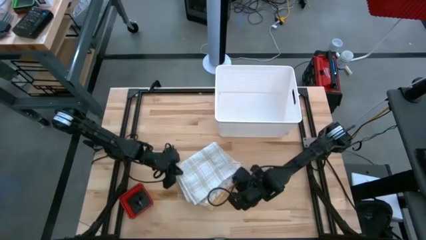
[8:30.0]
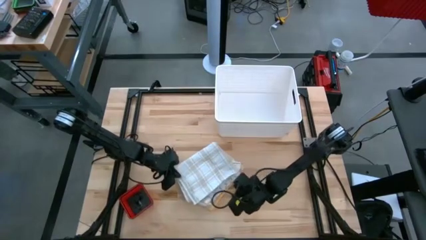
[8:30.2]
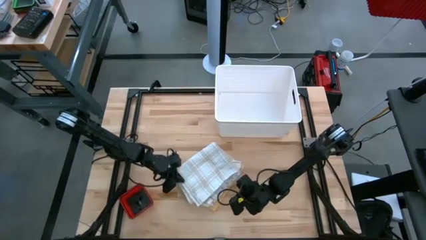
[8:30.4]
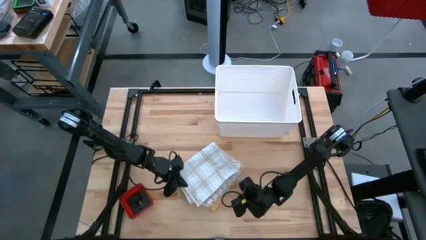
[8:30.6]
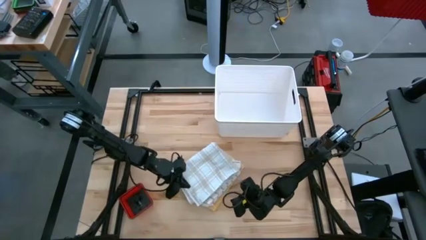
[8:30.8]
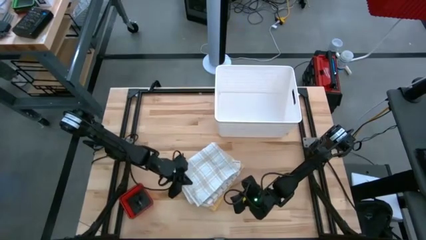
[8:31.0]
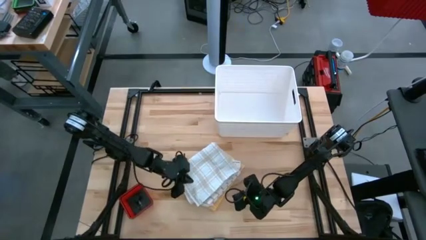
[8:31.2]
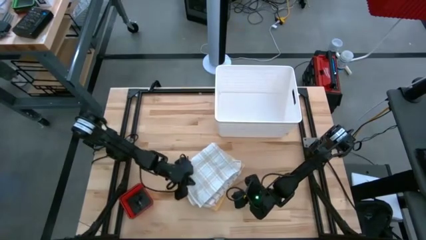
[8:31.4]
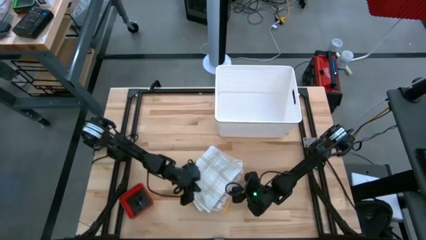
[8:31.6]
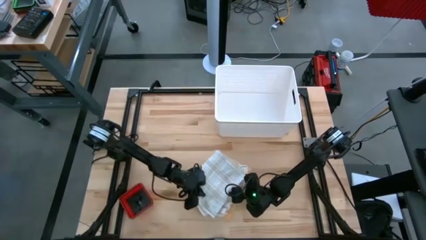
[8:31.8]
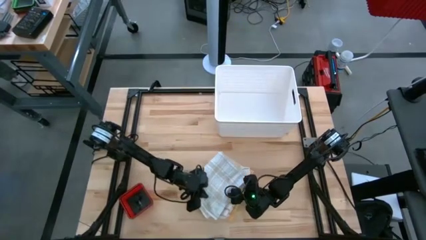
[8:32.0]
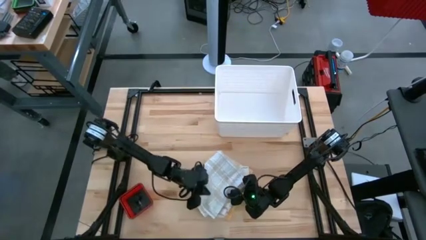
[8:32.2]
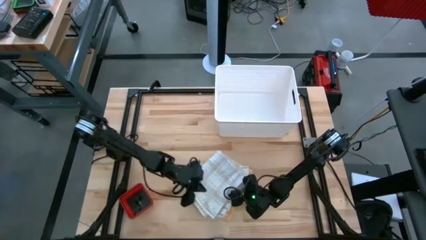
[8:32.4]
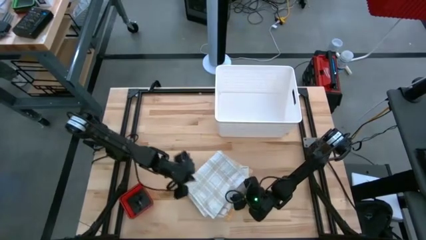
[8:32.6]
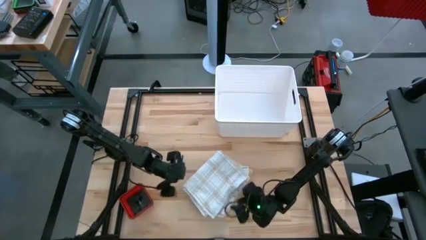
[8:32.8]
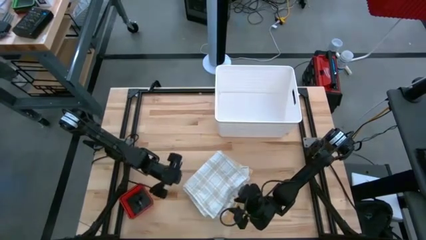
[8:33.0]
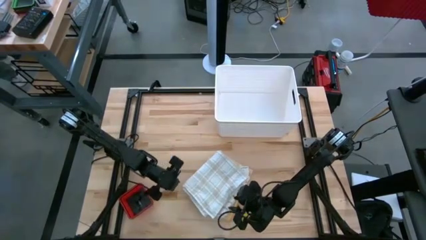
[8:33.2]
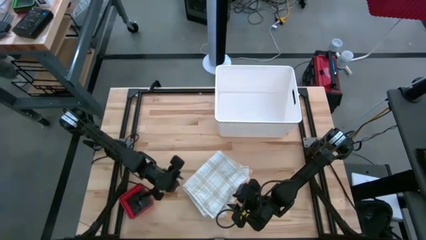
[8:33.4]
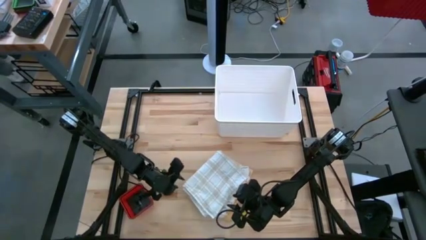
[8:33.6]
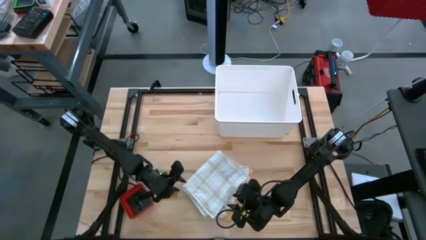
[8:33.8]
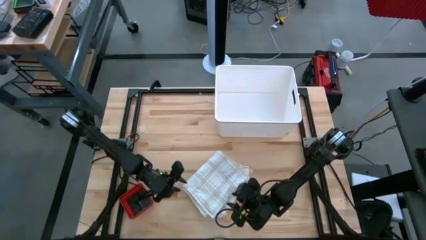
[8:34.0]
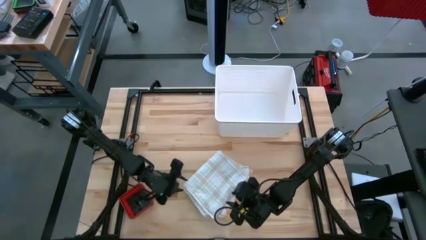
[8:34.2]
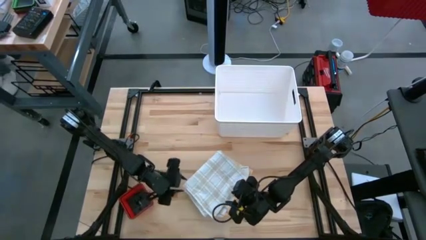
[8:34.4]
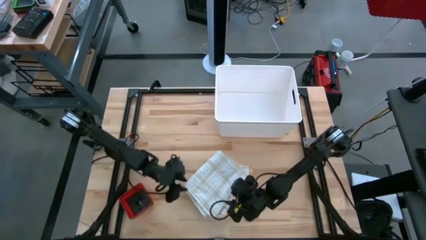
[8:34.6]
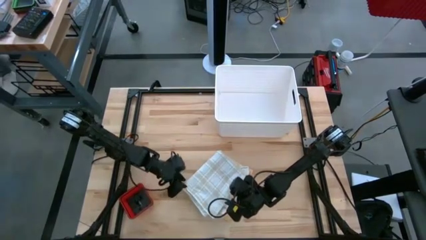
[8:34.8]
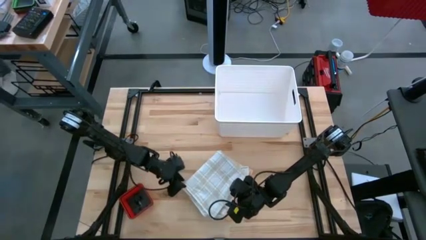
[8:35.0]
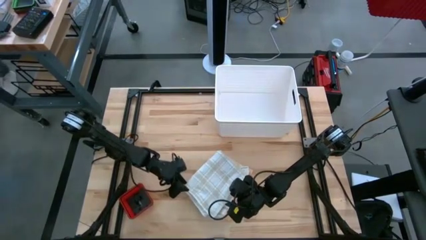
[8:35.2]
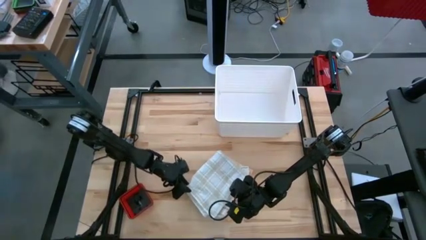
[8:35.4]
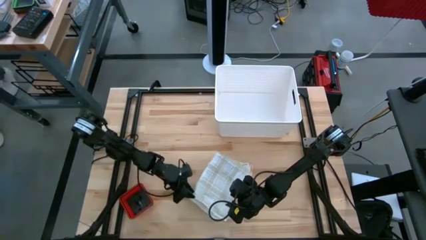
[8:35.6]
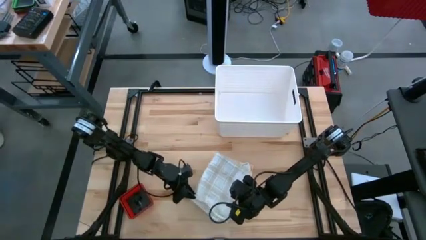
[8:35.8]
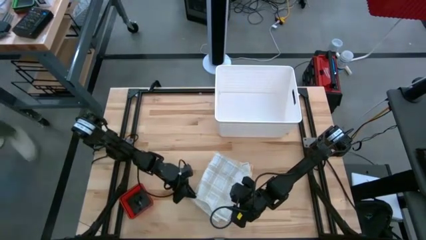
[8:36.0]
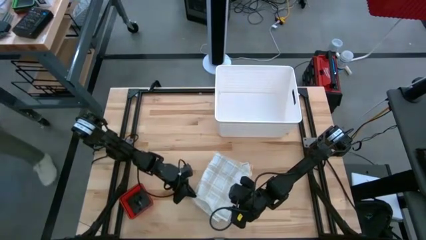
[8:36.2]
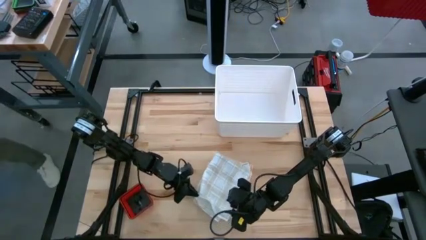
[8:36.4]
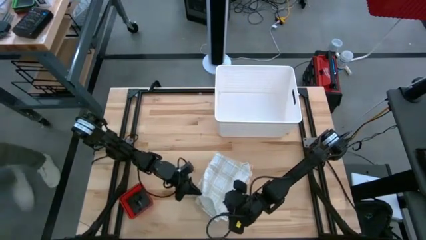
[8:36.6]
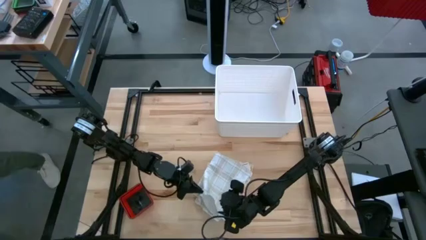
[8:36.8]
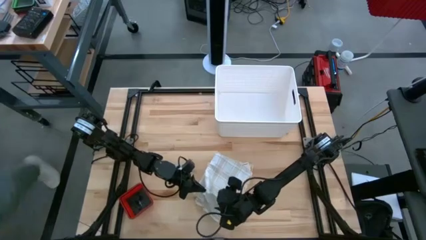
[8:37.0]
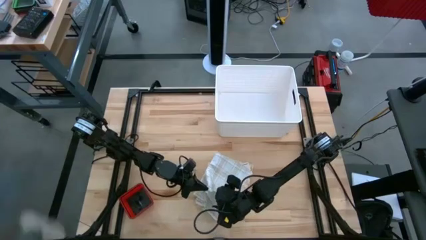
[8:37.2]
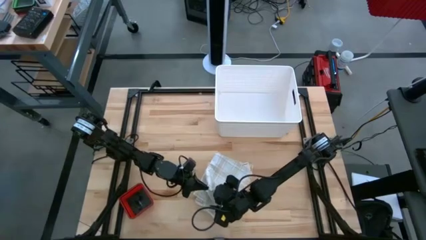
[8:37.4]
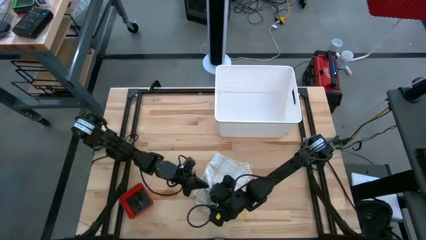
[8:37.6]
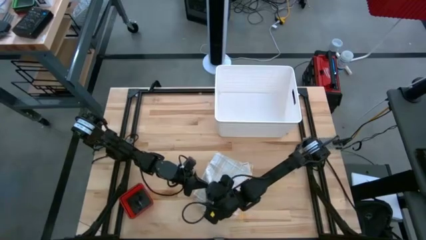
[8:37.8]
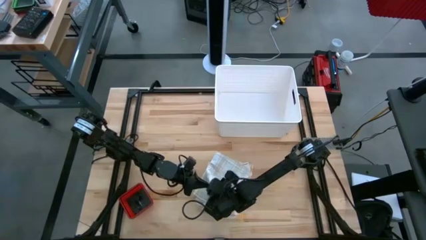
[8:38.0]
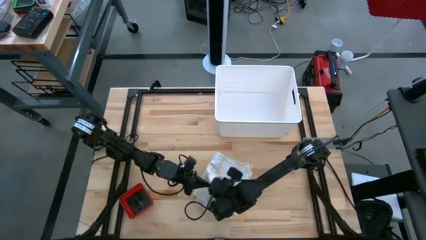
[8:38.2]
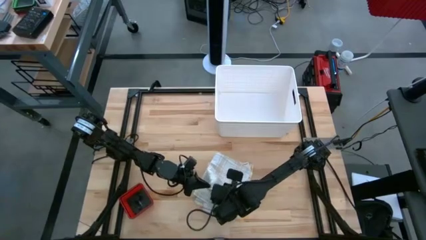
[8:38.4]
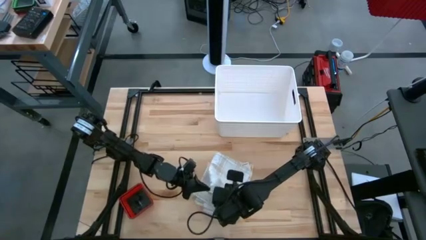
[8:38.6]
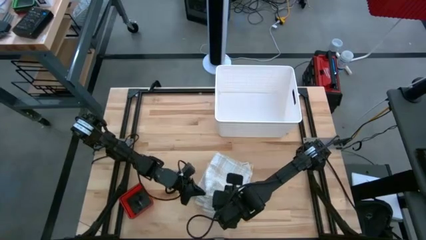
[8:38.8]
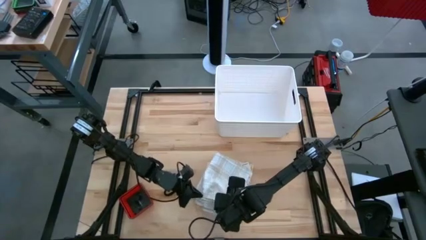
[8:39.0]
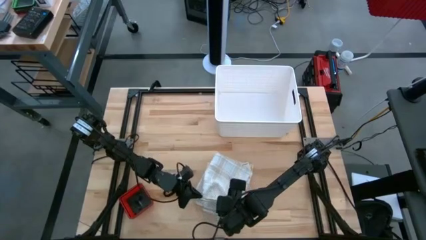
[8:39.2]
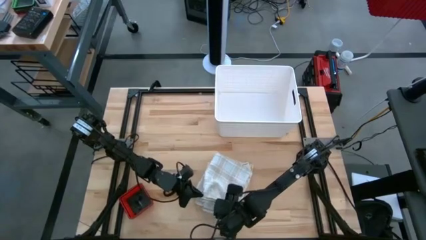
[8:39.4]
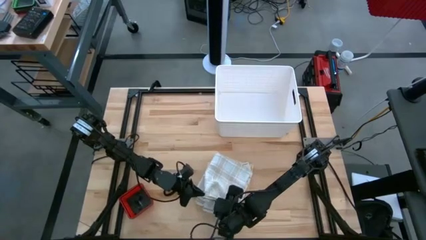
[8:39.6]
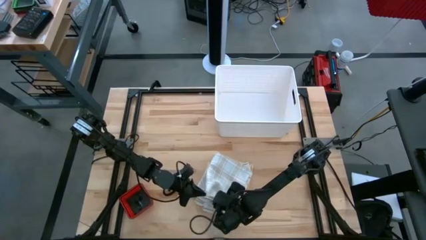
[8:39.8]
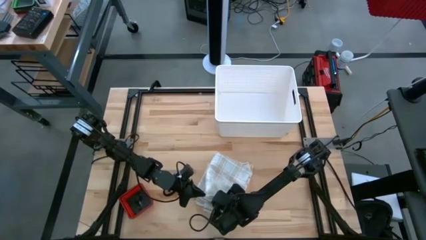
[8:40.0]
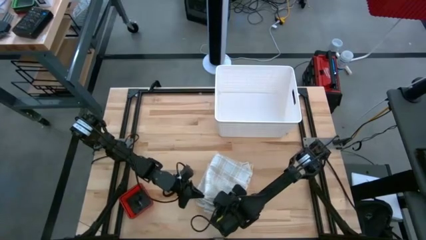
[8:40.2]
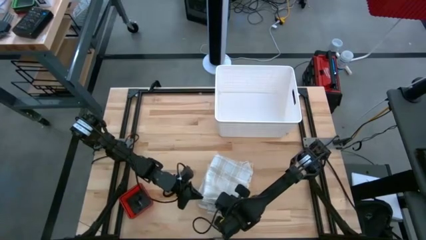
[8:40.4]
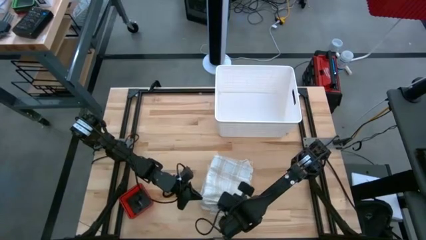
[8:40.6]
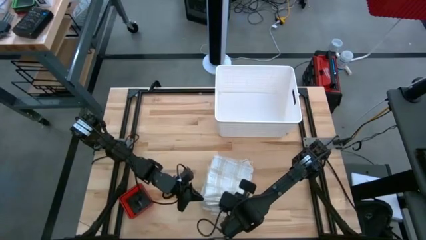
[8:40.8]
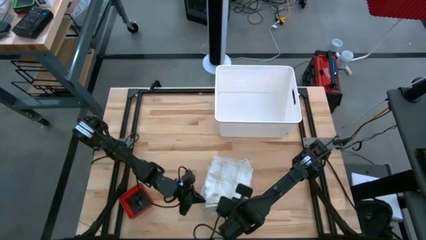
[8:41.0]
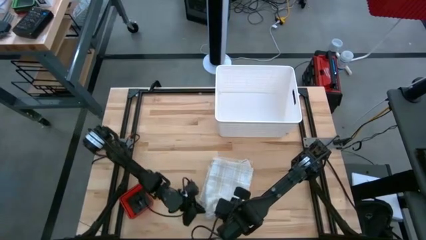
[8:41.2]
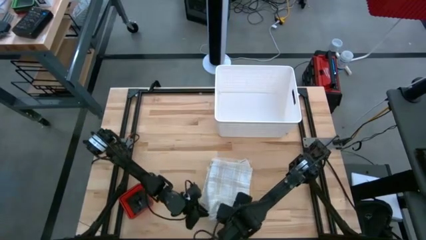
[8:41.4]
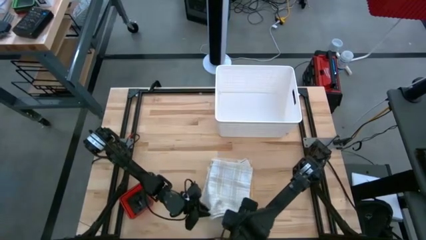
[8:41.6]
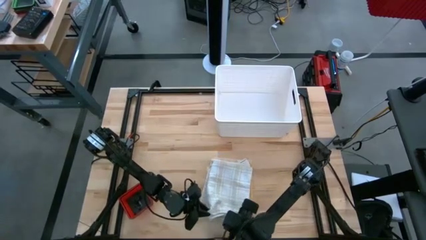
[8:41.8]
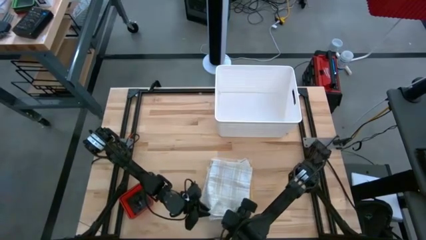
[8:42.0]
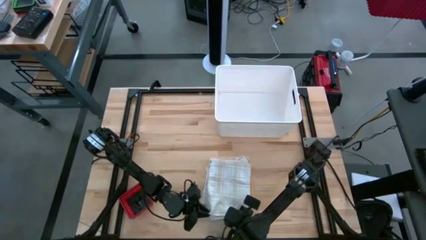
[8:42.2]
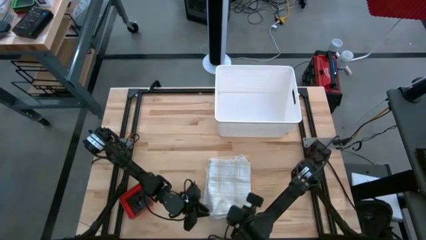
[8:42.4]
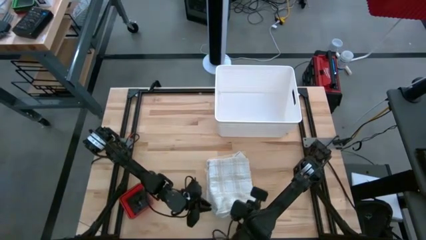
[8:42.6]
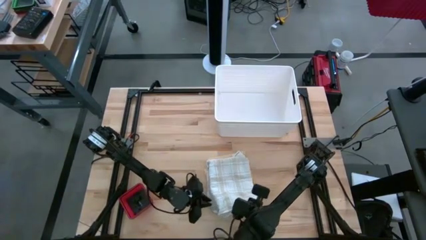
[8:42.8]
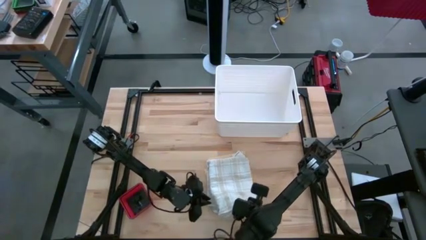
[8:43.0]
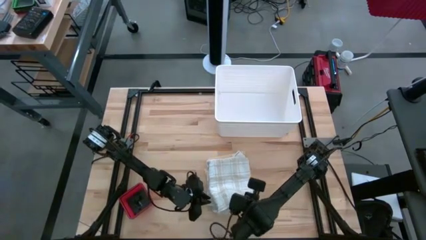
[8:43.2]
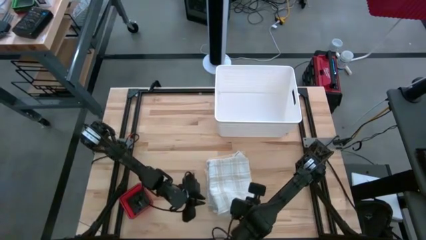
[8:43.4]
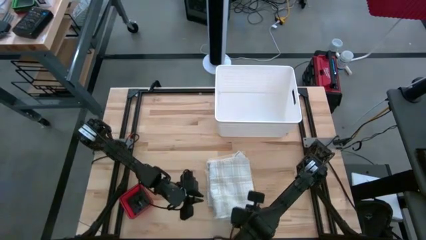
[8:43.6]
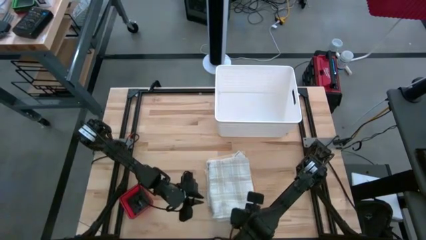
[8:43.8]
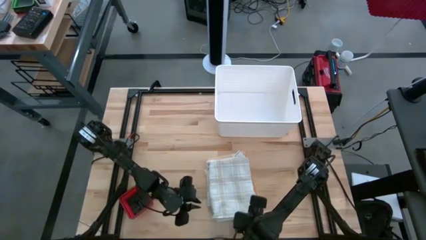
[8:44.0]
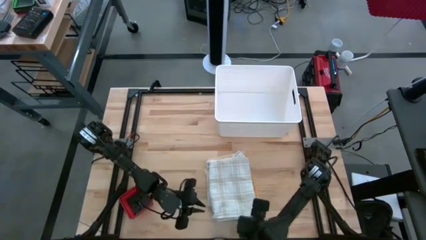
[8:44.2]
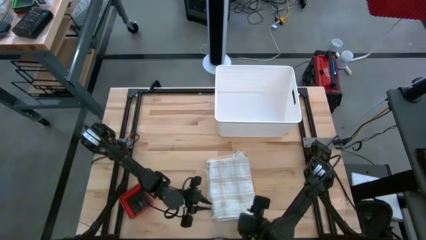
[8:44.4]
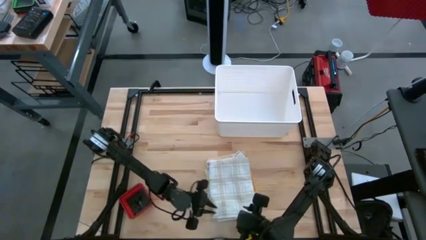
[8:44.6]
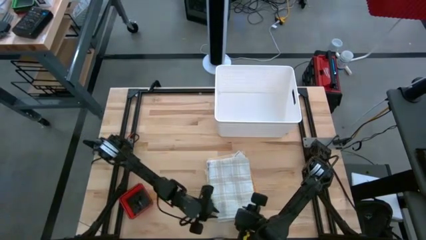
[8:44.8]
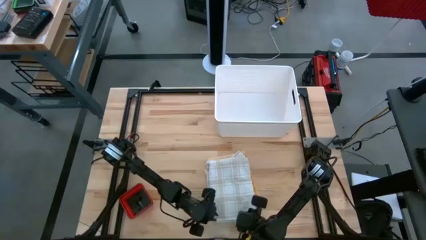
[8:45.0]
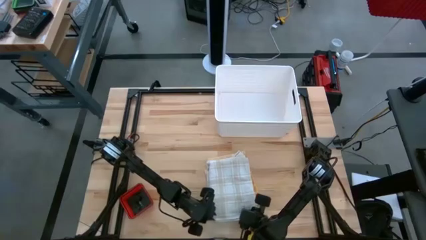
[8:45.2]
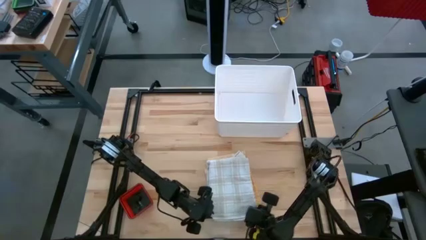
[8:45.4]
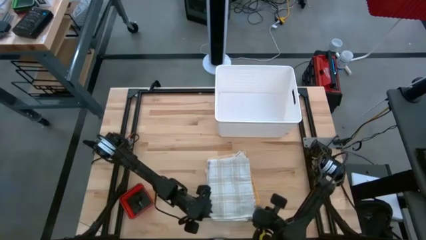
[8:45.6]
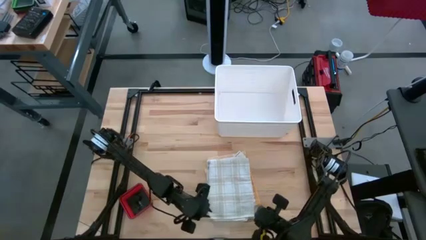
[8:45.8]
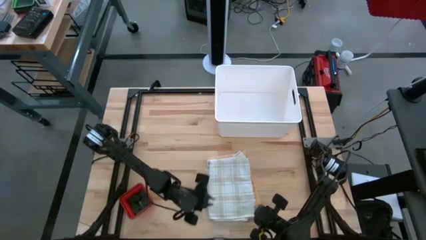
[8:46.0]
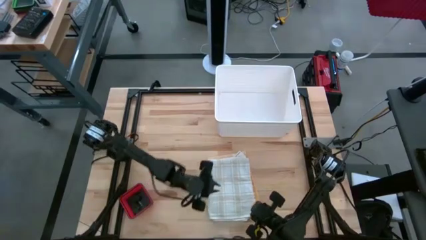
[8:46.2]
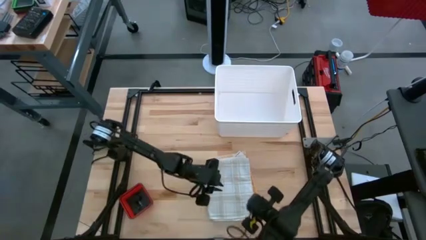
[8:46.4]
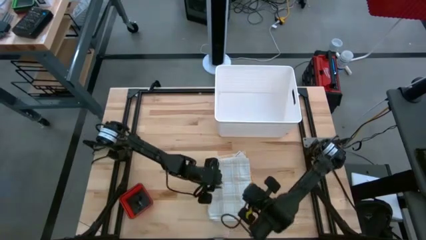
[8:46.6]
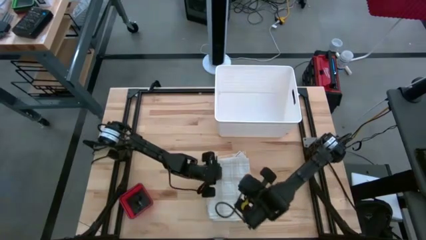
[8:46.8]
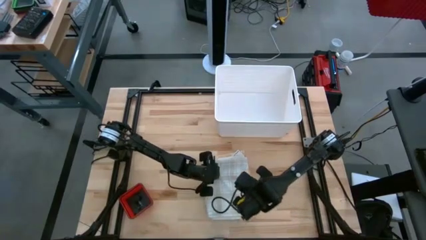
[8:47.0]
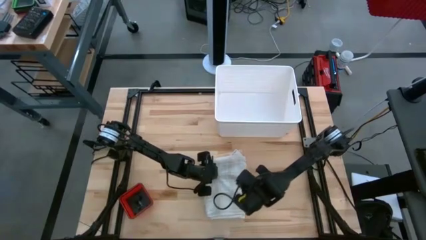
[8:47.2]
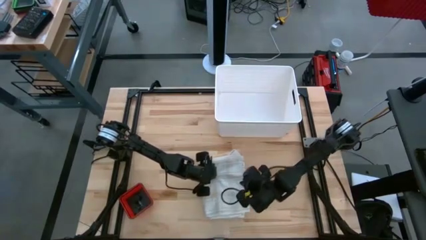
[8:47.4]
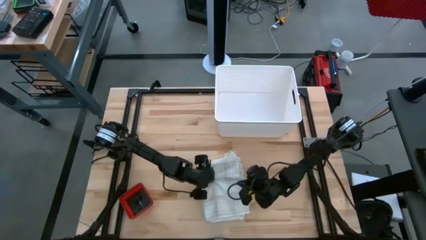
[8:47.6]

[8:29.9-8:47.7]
Task: Fold towel
Stack the light gray patterned towel on top of the brown patterned towel
